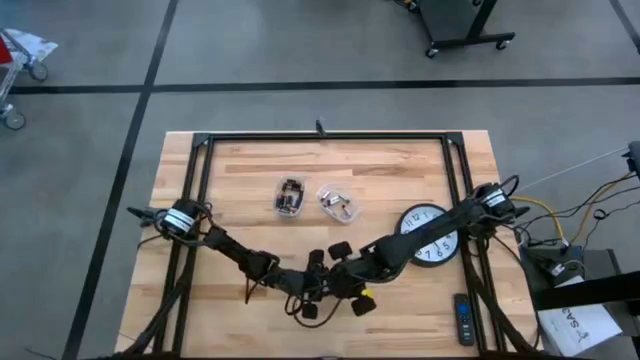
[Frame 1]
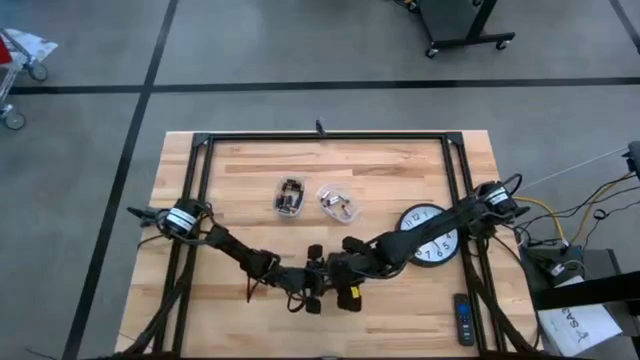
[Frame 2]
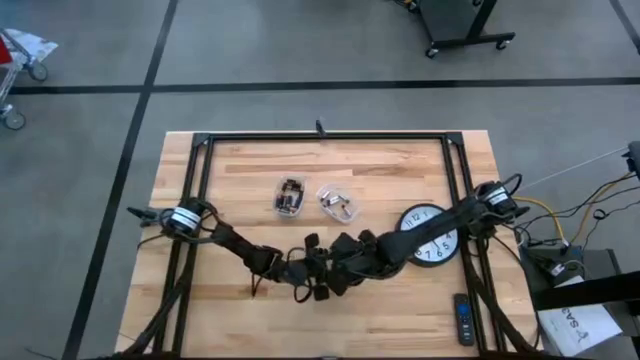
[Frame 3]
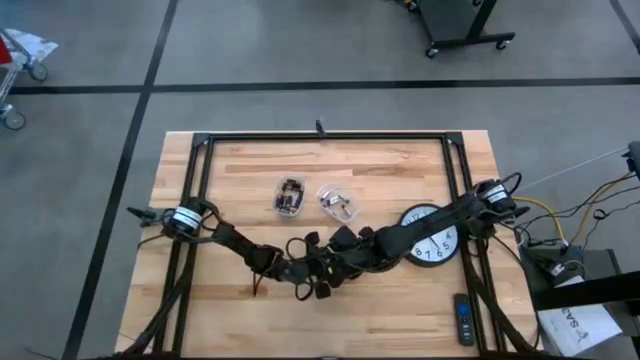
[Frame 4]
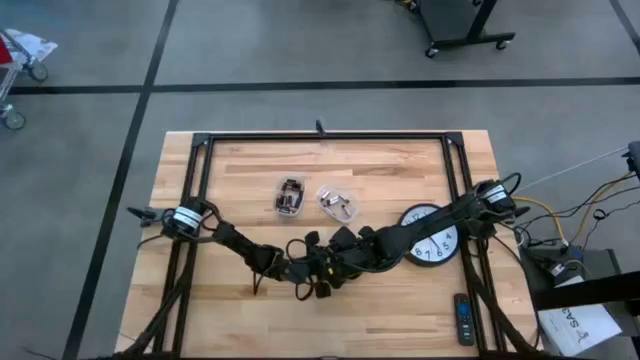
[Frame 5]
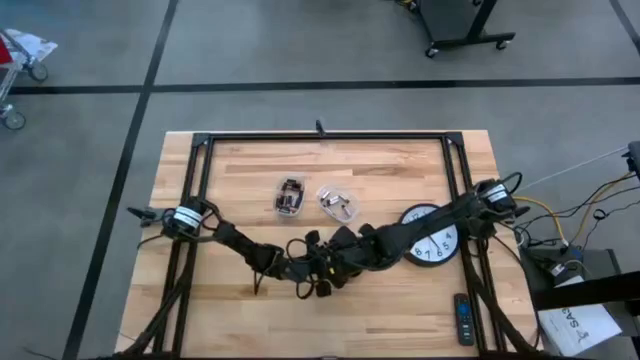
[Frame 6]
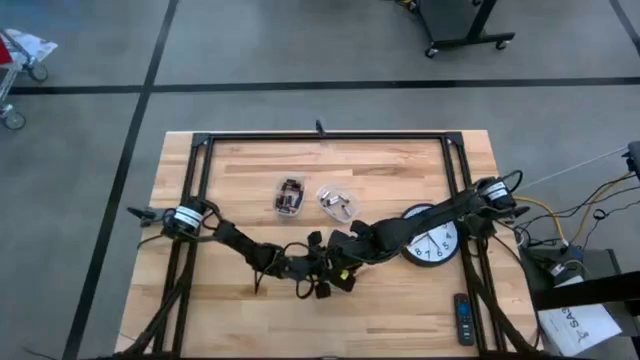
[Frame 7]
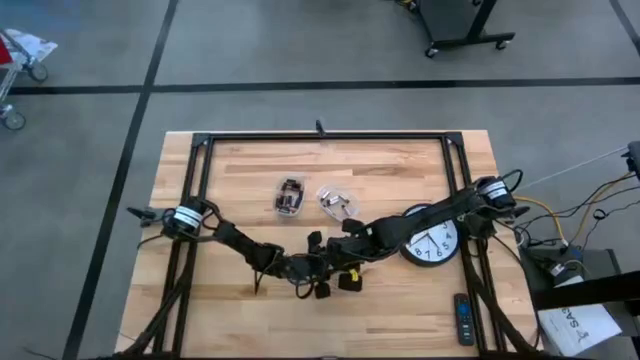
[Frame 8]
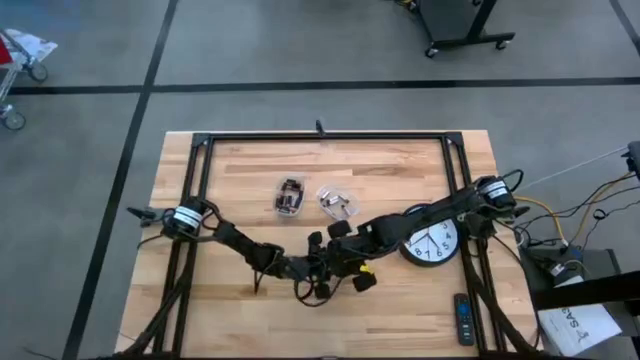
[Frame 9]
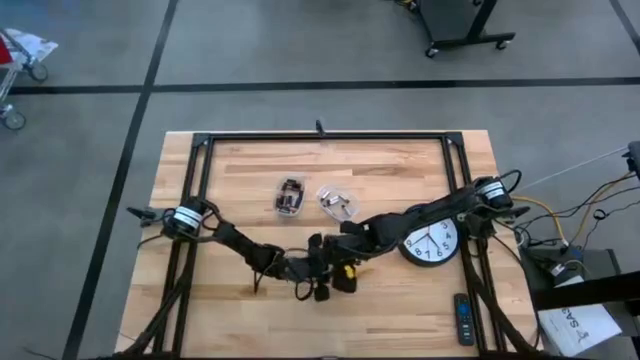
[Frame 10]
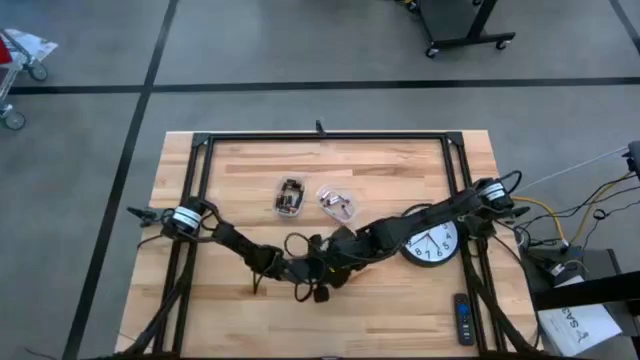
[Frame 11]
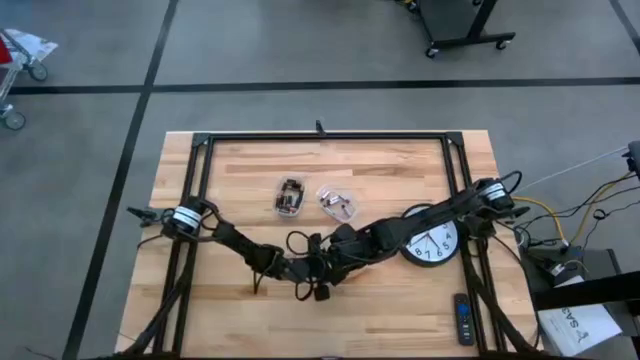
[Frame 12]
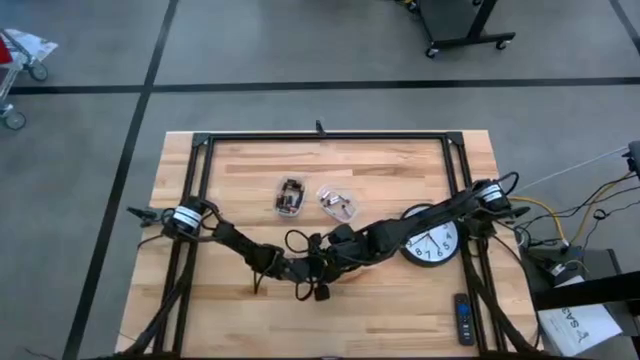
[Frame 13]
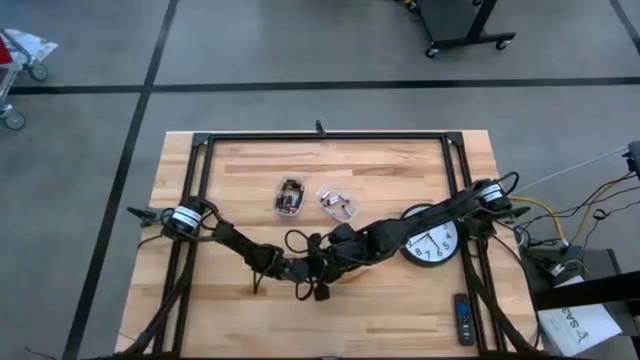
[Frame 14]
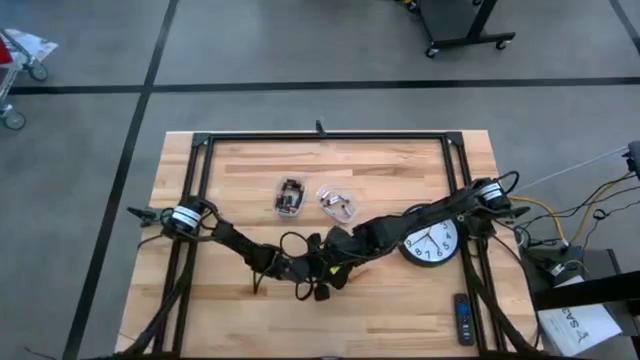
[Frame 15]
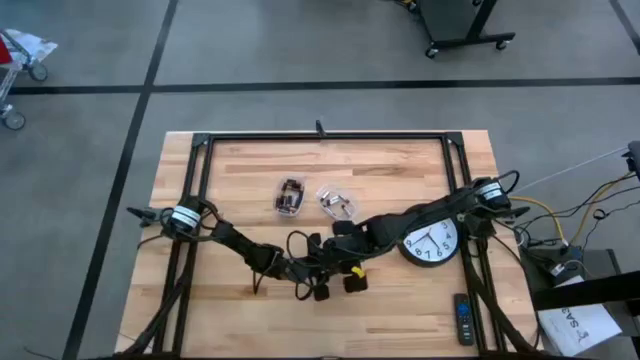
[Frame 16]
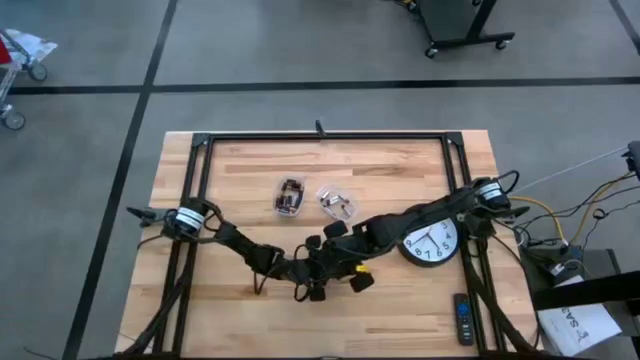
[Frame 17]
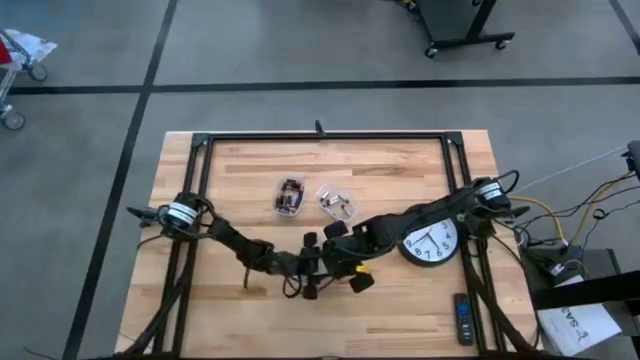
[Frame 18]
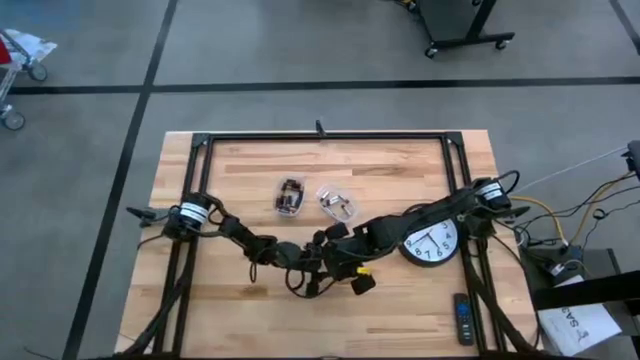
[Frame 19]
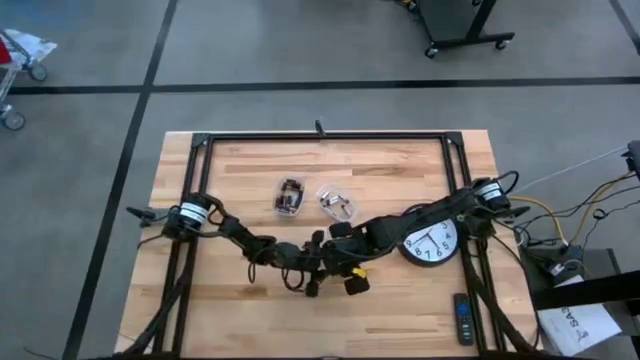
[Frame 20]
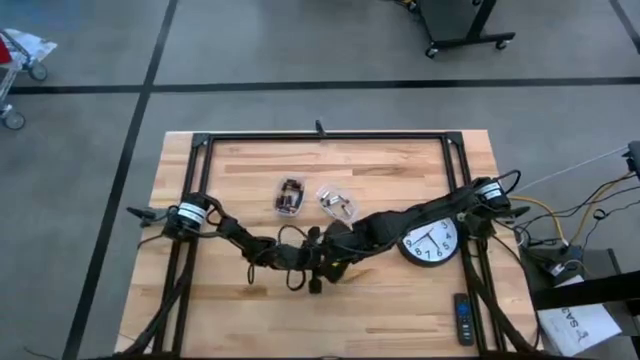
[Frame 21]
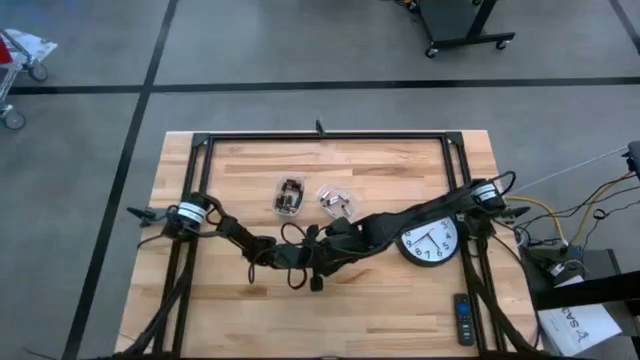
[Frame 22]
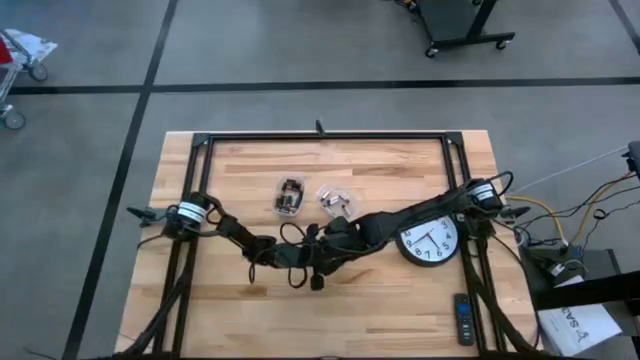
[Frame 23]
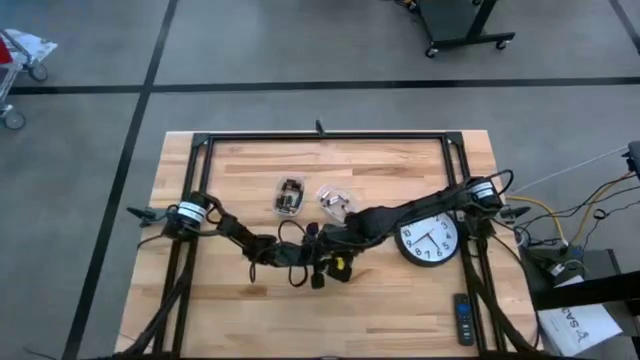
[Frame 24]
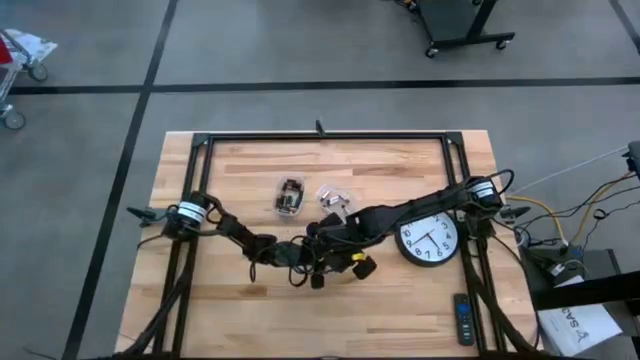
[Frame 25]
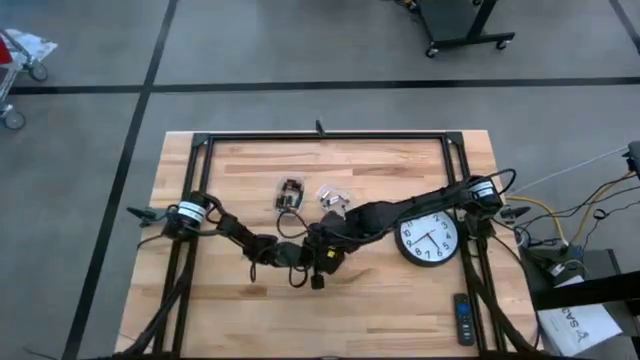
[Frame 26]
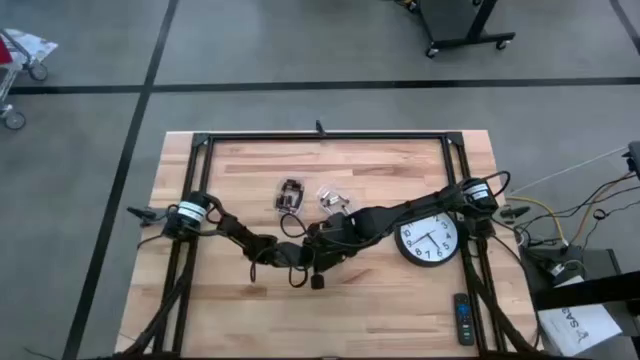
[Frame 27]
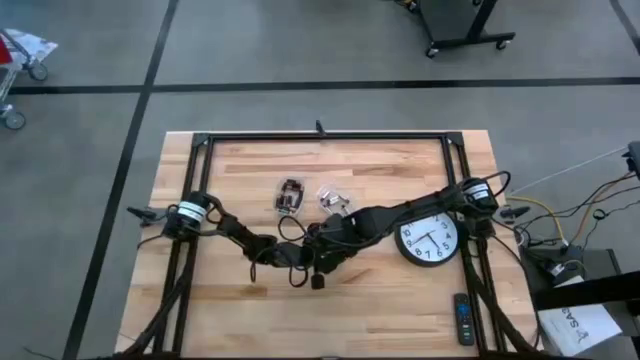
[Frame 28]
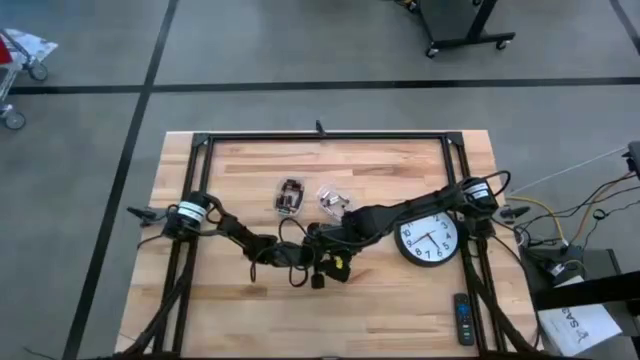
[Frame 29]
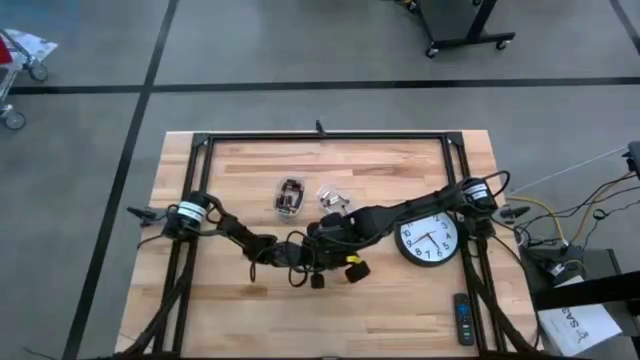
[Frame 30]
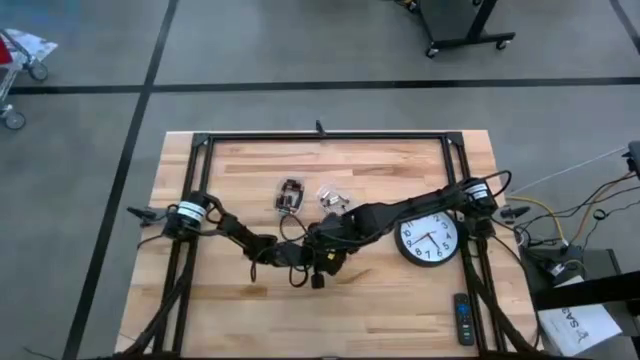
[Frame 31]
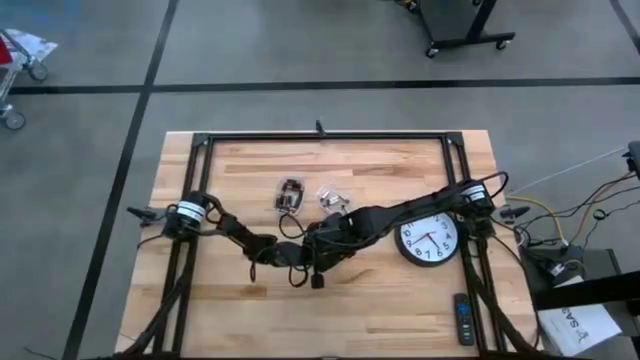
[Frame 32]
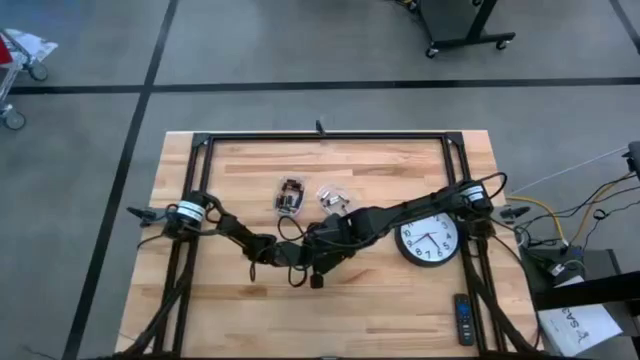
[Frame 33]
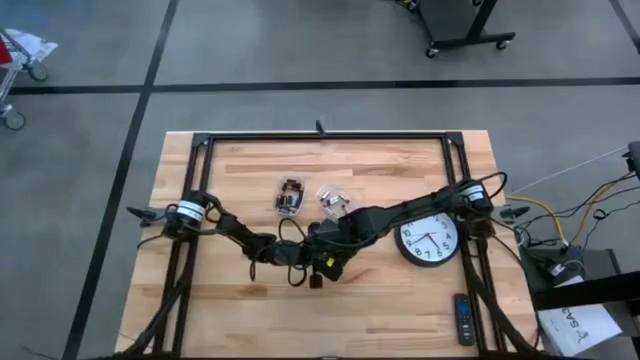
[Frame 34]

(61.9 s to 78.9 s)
Task: Insert battery
Open the black flashlight cover

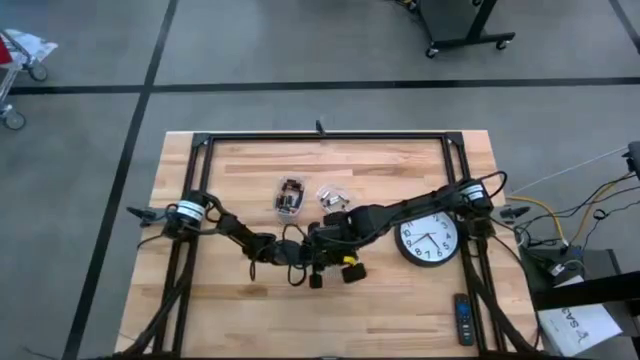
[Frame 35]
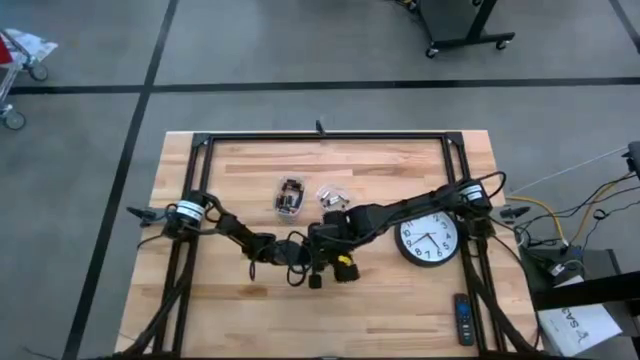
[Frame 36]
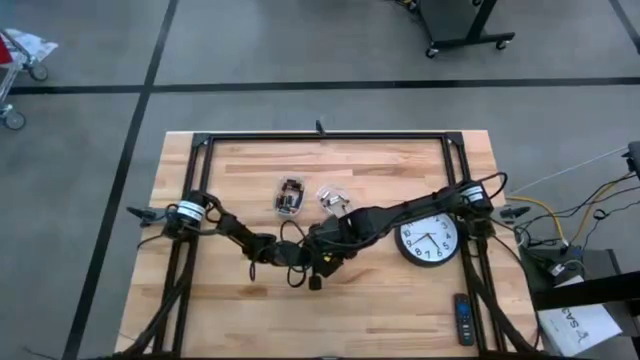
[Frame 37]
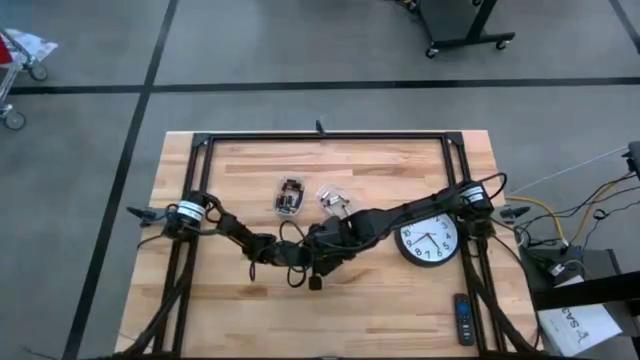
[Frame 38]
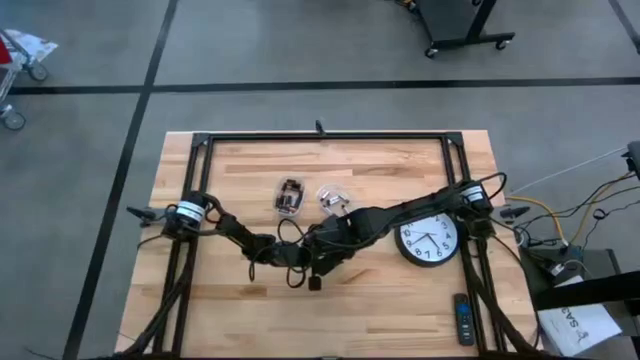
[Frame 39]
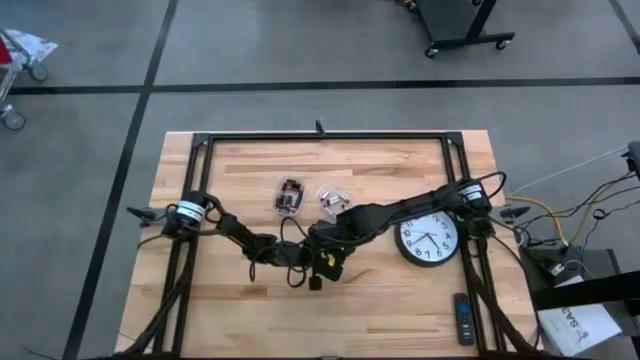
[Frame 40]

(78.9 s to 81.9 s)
Open the black flashlight cover

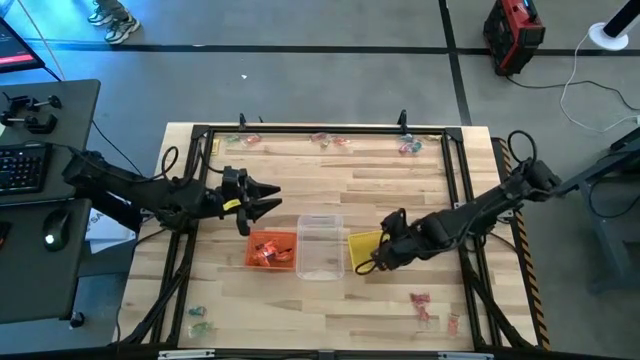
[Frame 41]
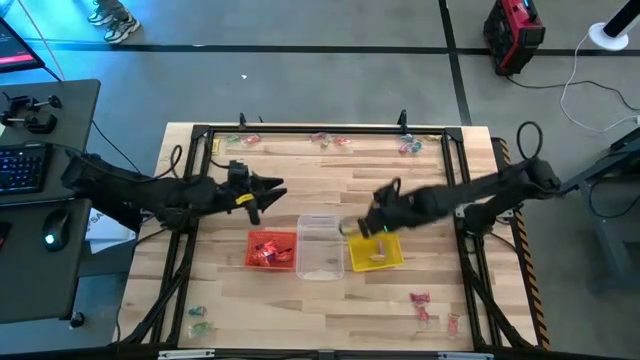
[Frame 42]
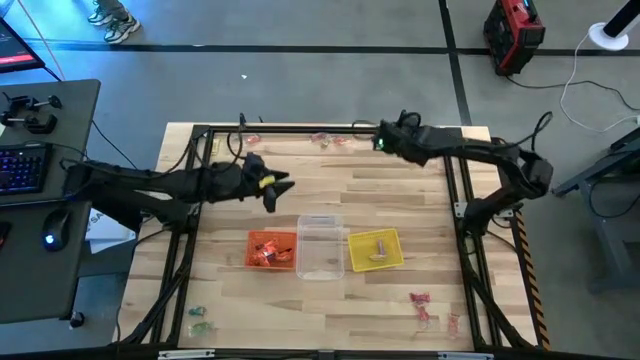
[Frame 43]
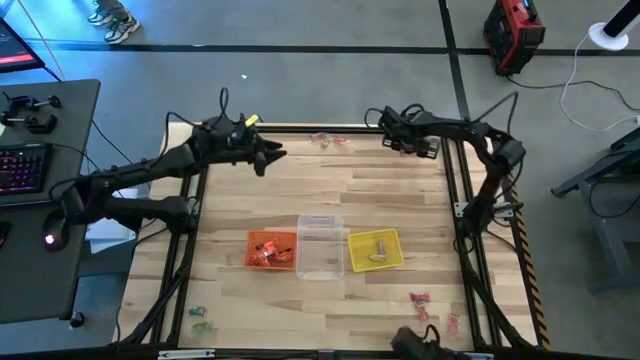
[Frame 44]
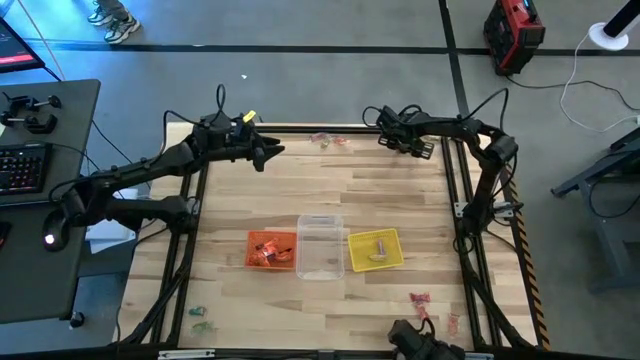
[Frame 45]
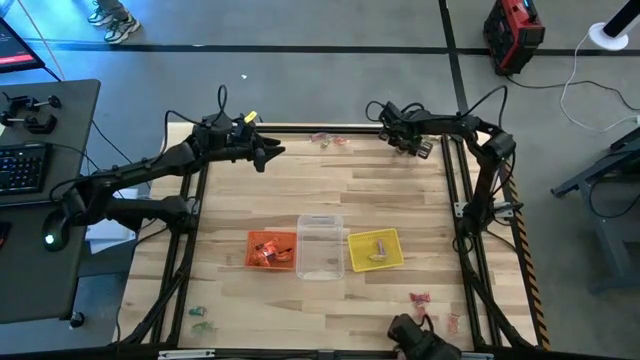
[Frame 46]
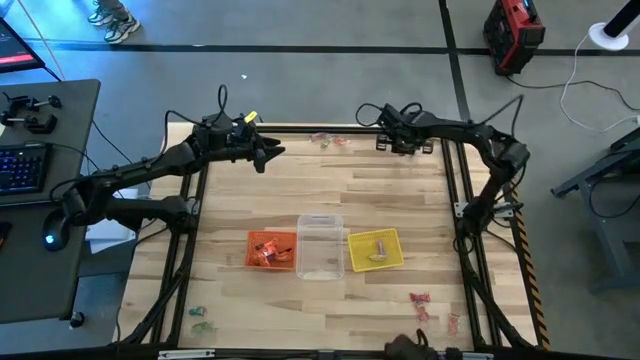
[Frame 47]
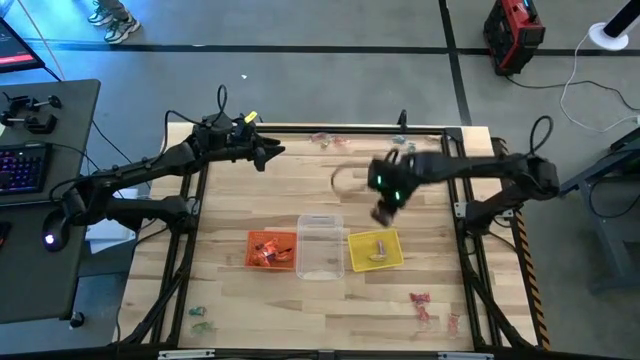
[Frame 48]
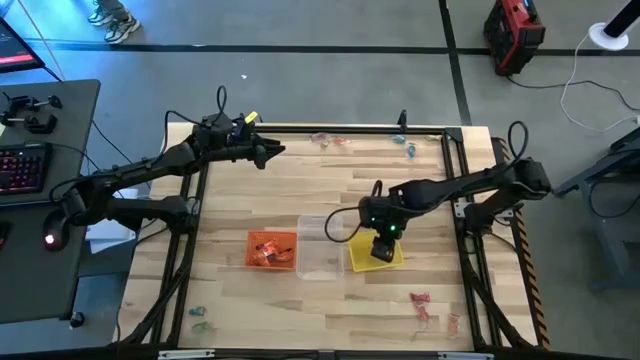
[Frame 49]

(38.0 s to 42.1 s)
Task: Sort candy by brand, put in halloween buckets
Put the red candy into the yellow bin
